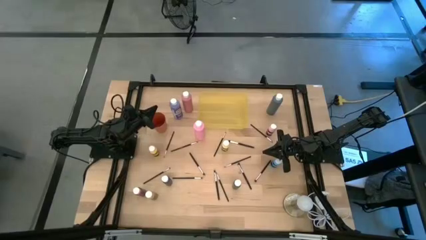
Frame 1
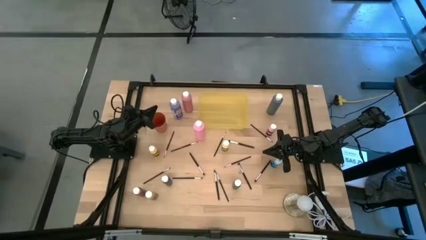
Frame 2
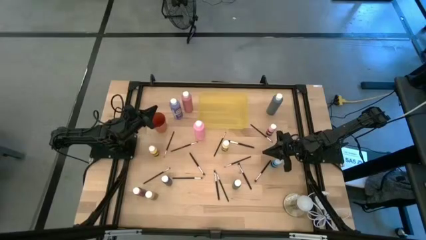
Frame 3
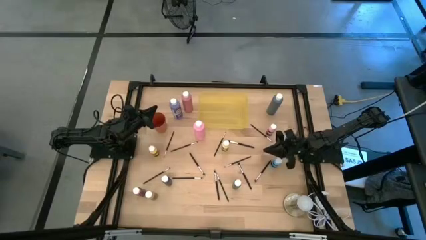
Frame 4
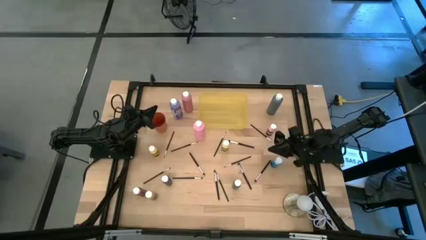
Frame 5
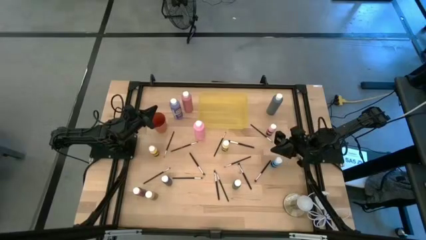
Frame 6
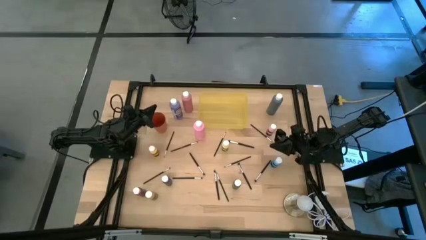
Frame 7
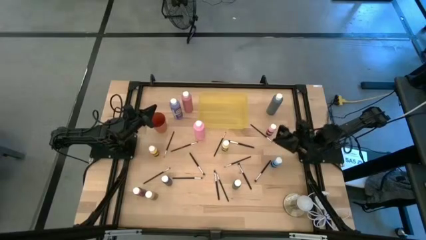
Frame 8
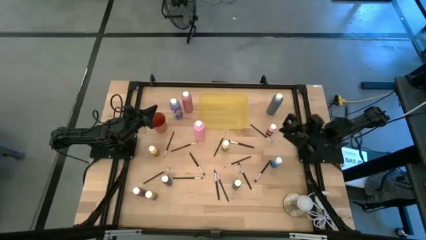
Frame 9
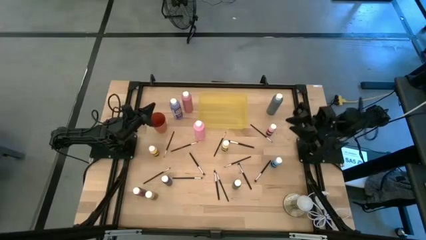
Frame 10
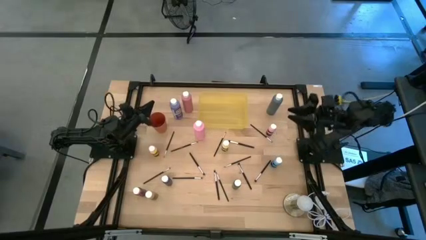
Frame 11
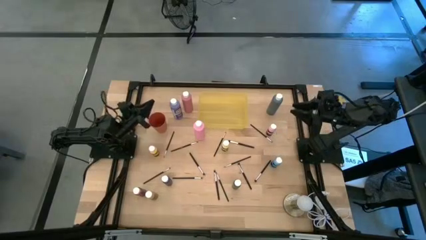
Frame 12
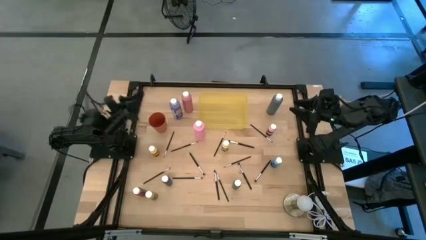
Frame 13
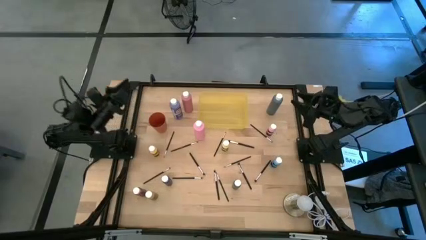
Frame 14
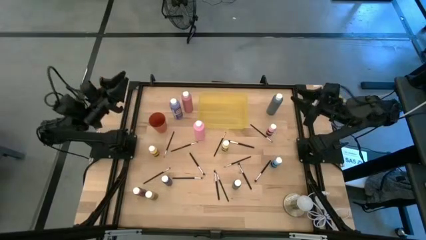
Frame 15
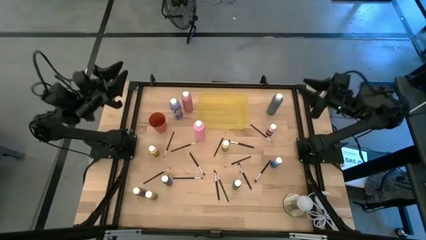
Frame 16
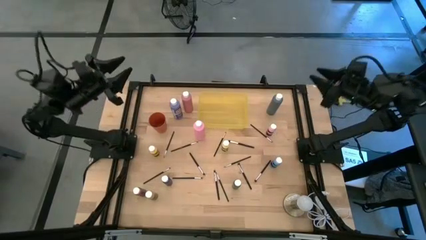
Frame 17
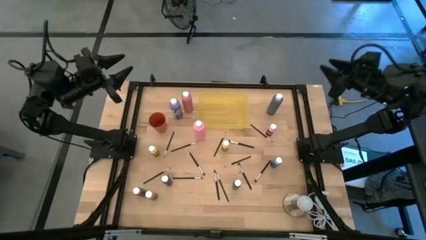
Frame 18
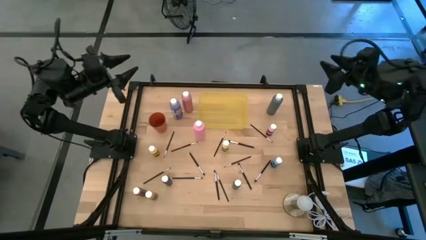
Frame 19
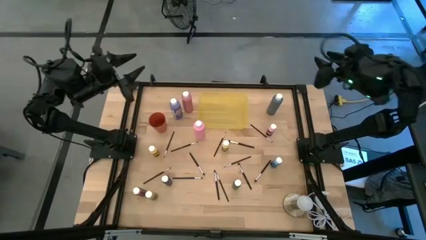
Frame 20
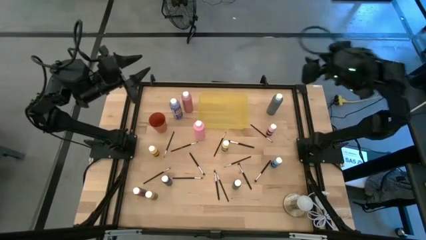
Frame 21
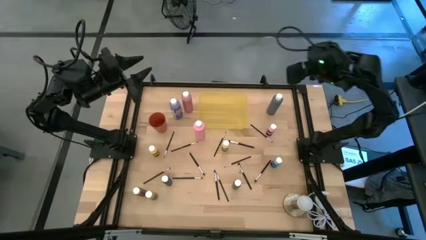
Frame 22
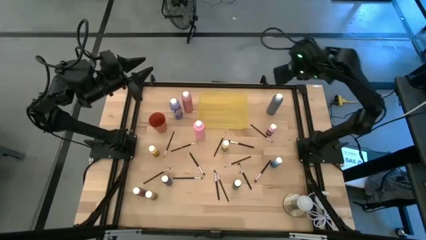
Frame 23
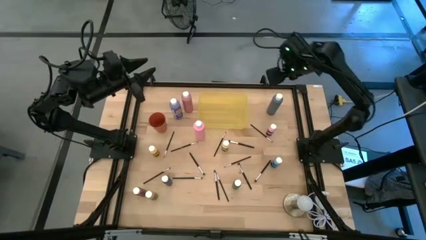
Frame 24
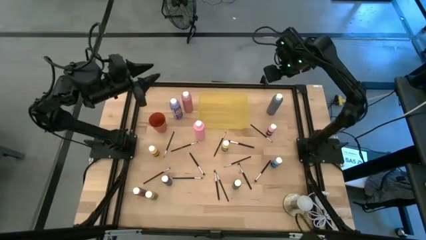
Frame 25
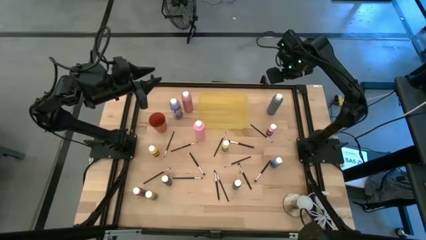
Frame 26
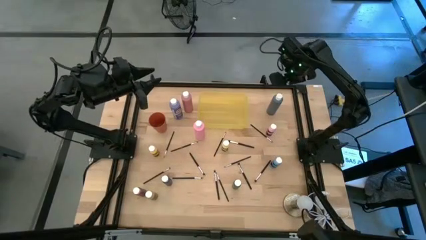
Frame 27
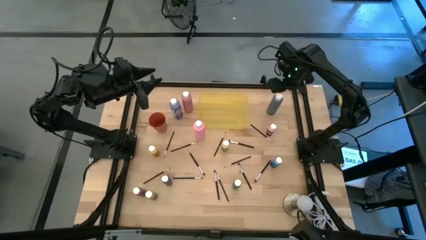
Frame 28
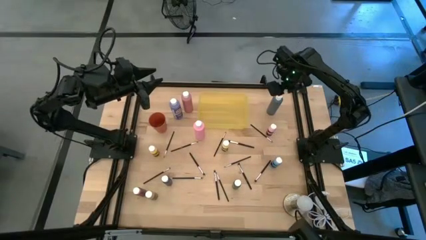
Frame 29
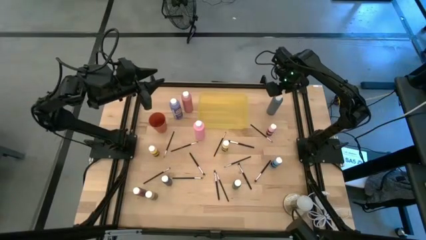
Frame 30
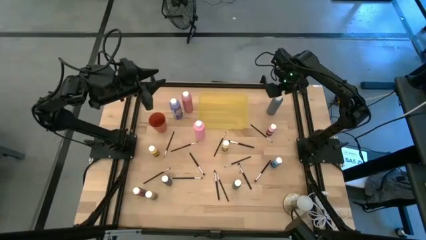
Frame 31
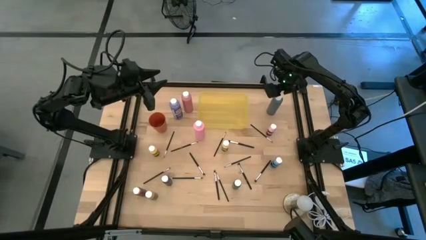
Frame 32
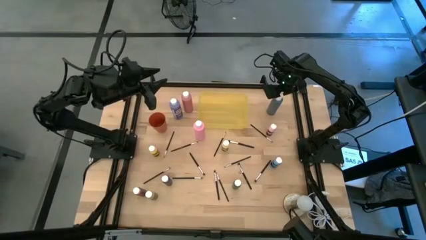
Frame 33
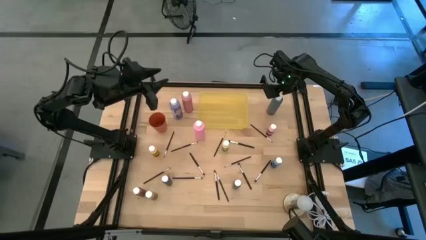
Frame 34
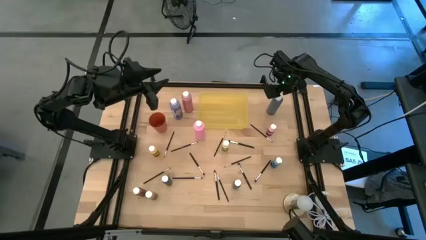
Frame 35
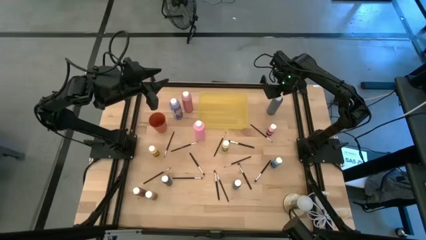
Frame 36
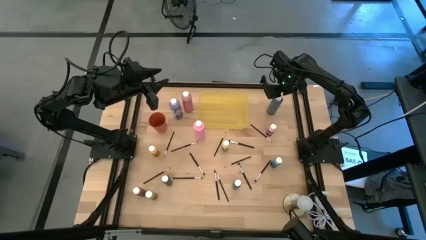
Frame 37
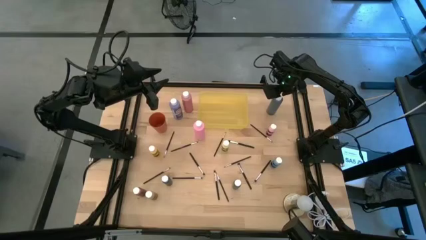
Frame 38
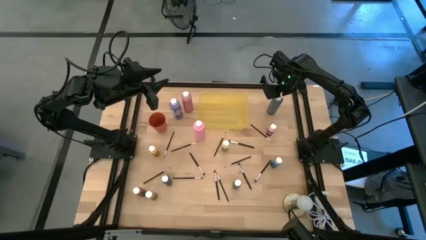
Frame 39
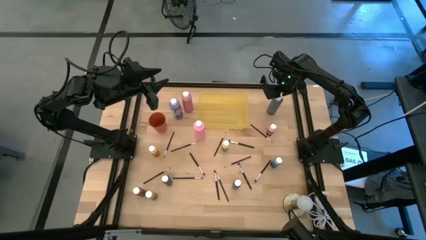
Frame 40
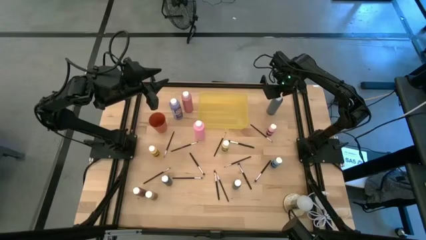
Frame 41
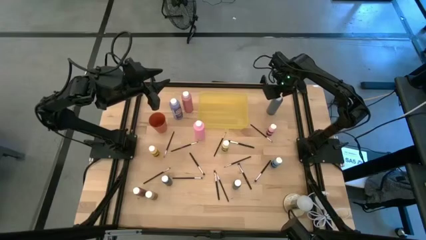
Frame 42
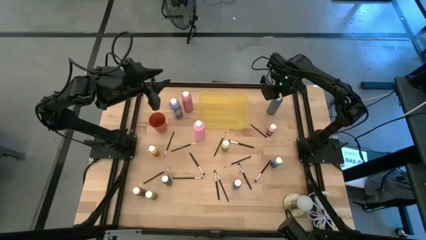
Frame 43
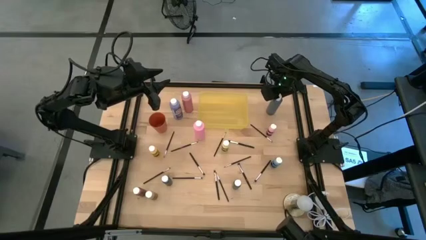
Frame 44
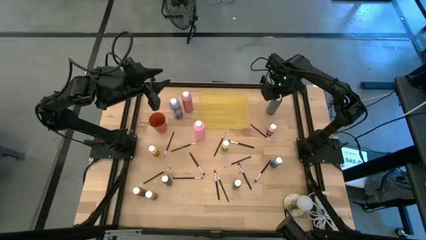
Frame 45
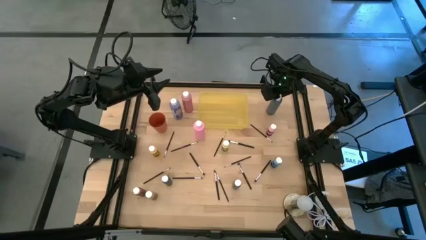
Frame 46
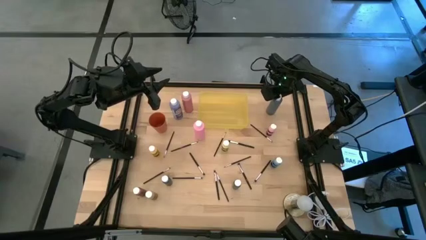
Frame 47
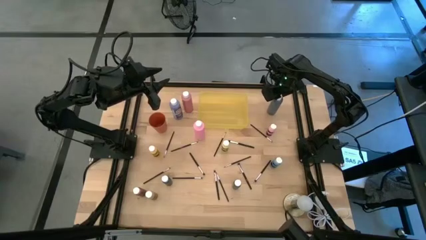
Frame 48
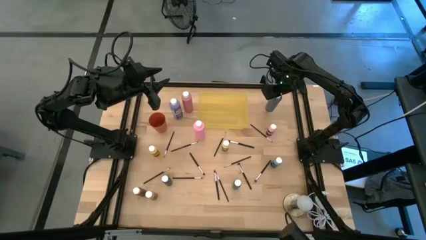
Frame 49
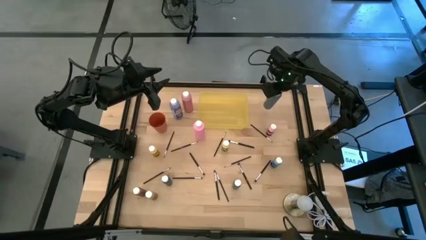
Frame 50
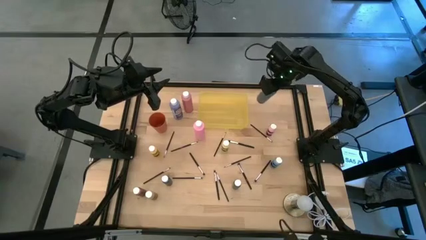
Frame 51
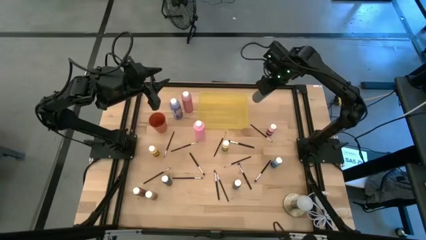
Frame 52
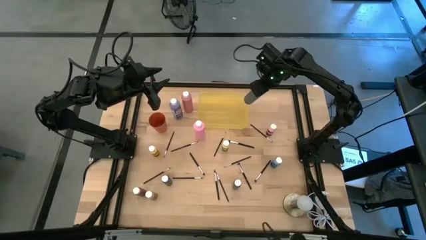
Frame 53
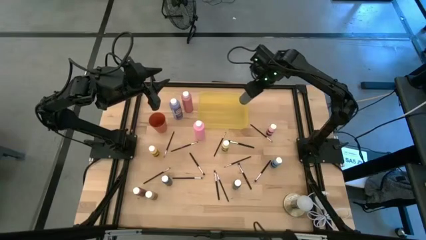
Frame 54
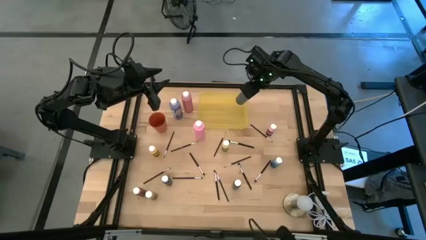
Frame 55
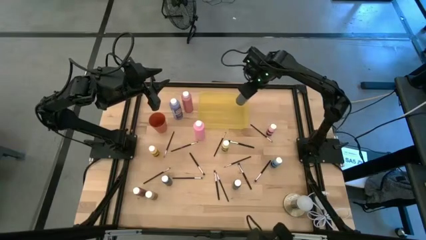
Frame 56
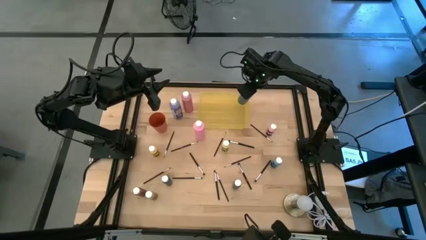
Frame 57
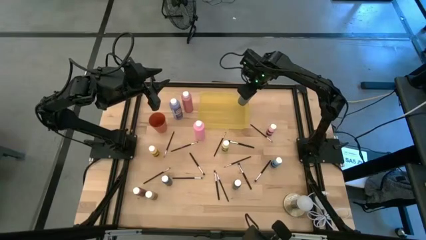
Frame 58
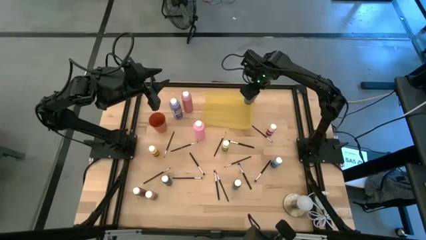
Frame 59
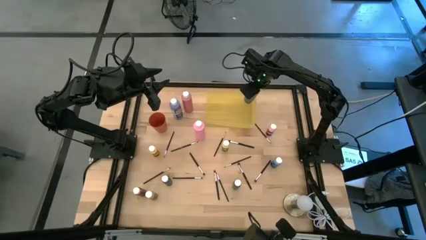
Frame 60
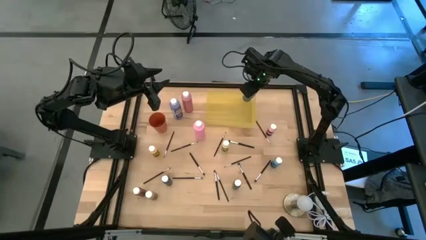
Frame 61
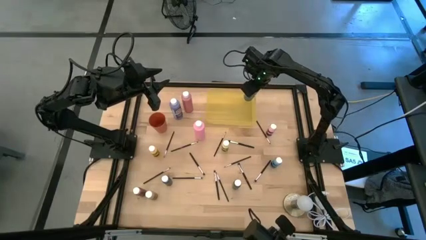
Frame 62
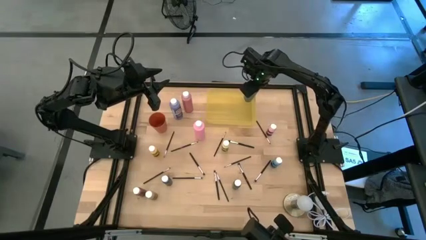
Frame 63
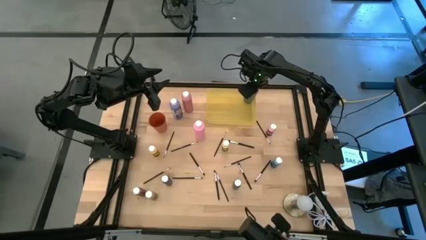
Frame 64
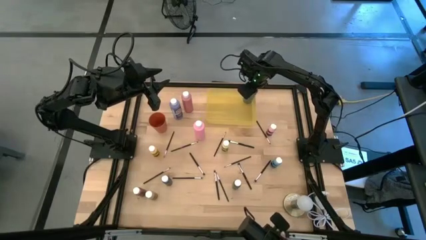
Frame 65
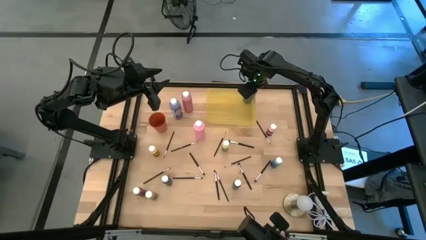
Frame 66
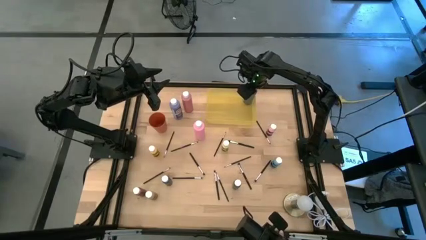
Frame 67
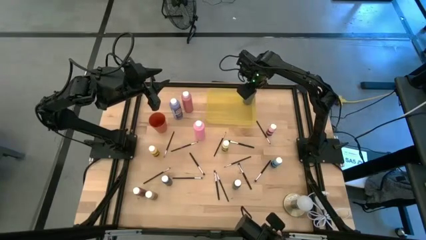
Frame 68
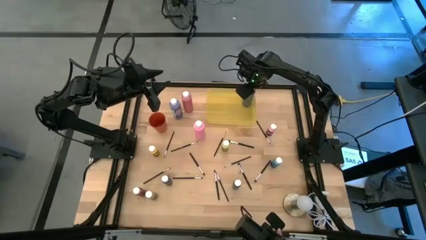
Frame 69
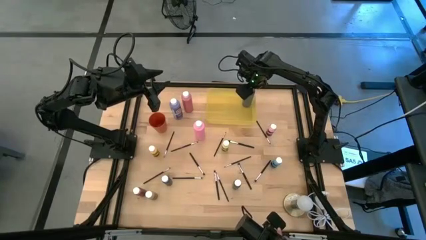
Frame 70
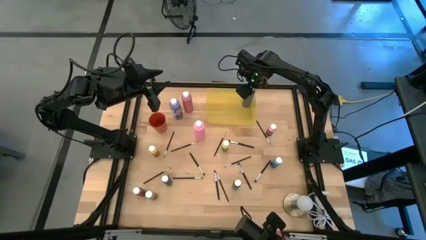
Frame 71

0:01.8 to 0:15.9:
Task: Pick & Place Paint Supplies
Put the large black paint bottle into the yellow bin
